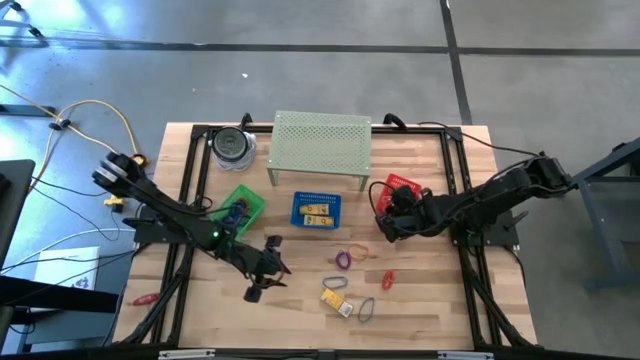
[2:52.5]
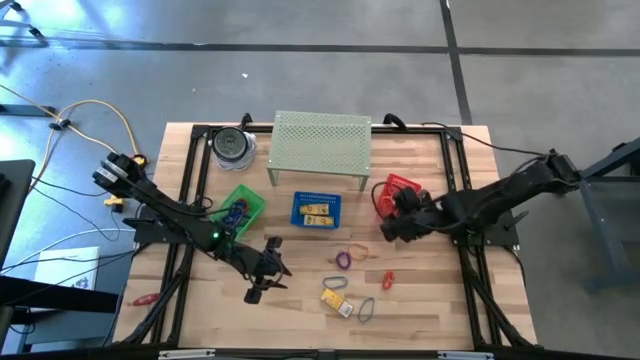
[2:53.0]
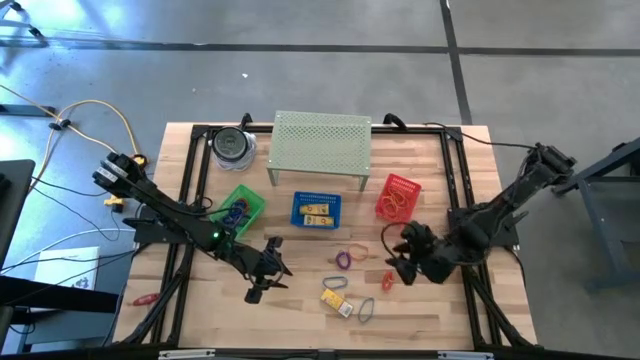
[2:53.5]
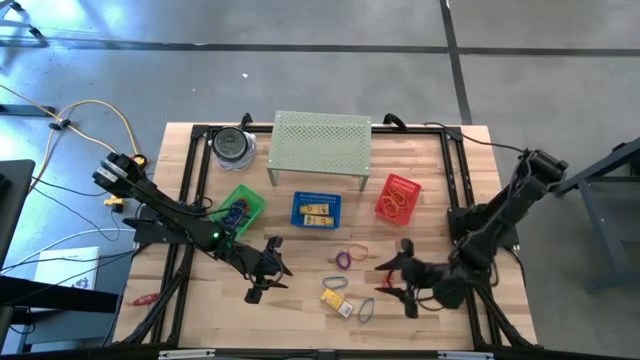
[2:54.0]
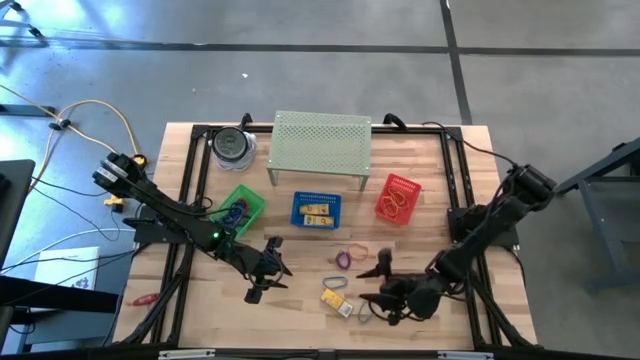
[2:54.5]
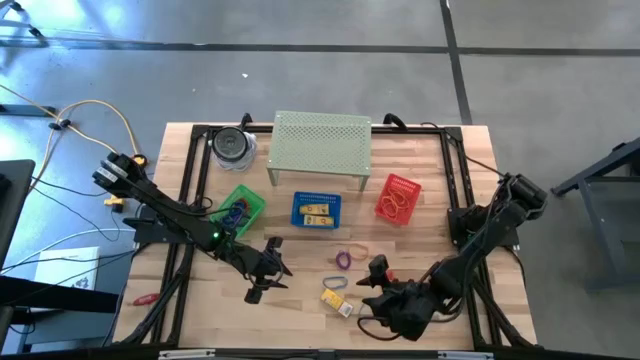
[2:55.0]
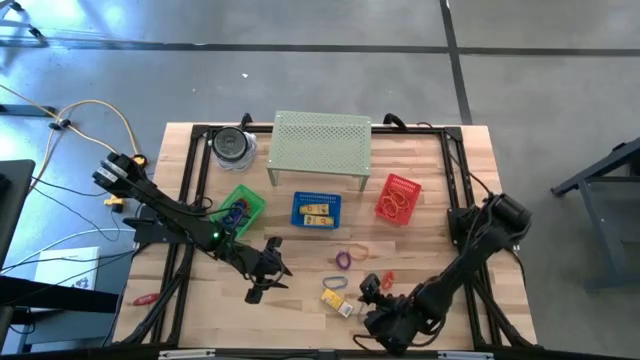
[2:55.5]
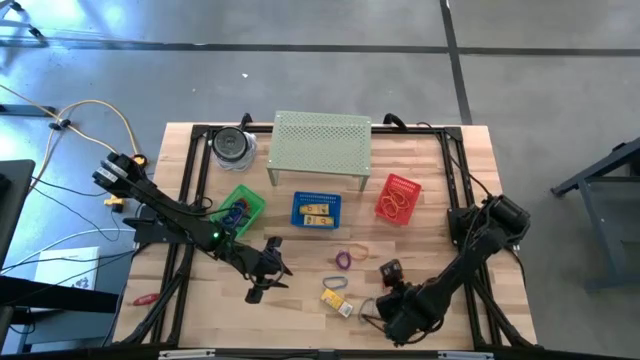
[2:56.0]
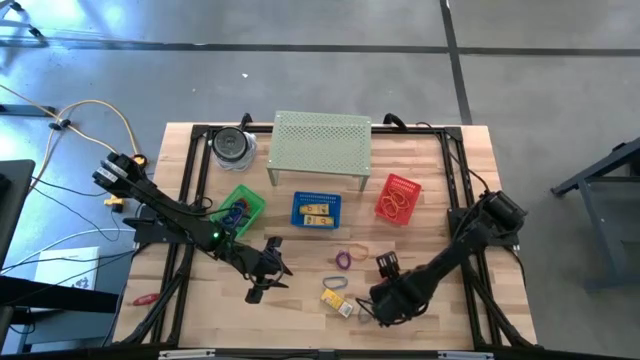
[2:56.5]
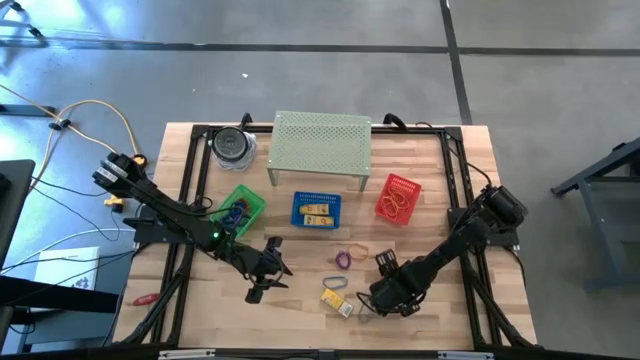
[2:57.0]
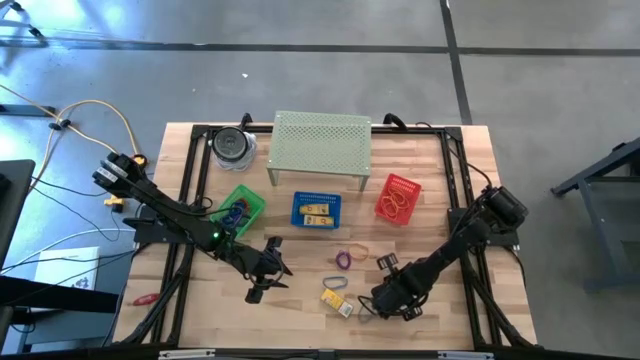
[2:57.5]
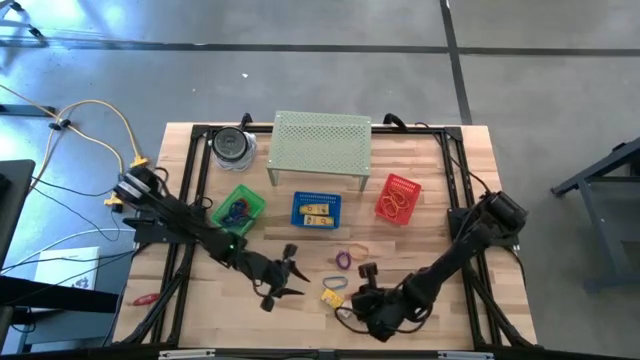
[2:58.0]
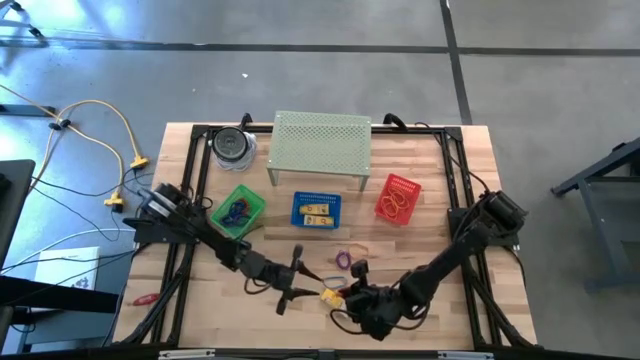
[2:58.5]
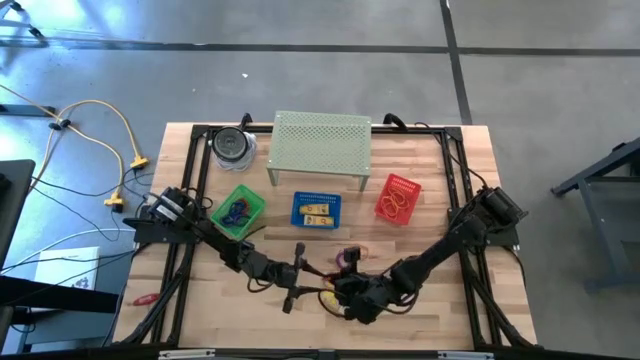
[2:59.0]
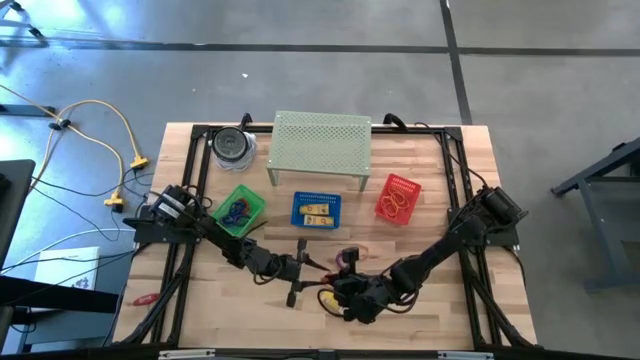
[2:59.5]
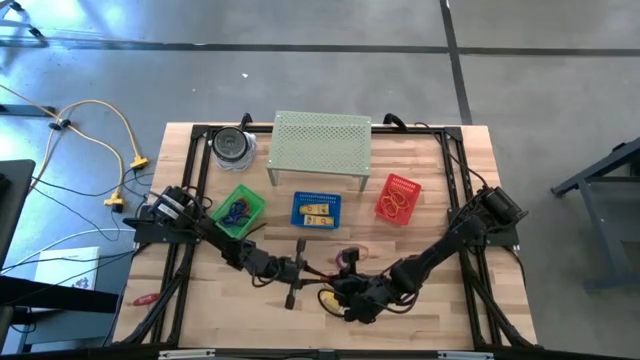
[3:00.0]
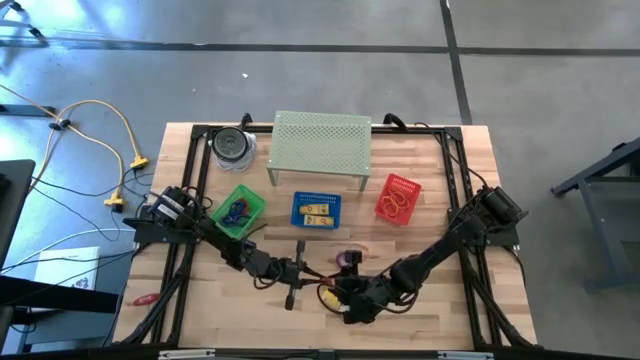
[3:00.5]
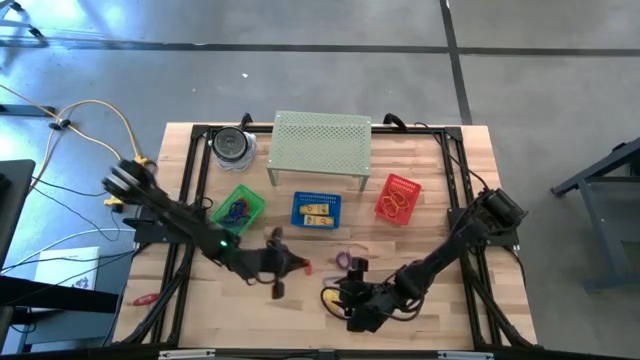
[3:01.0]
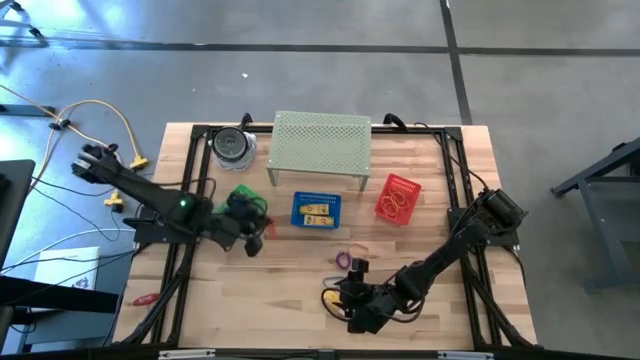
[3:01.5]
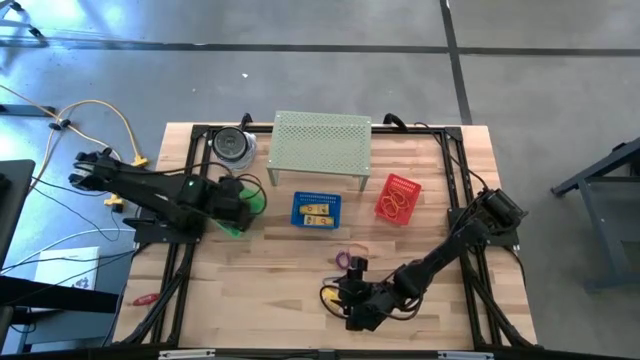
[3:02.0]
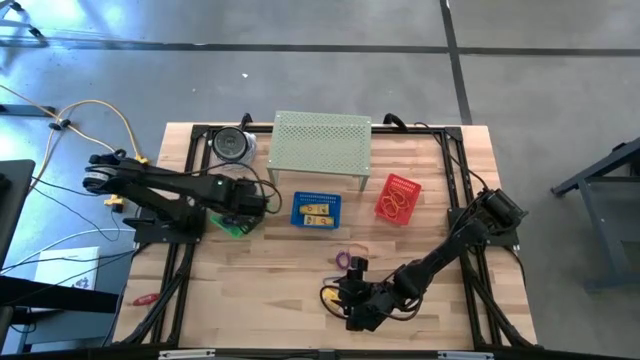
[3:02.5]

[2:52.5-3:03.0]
Task: Pick & Place Office Desk Supplies
Put the orange spring keychain into the green bin

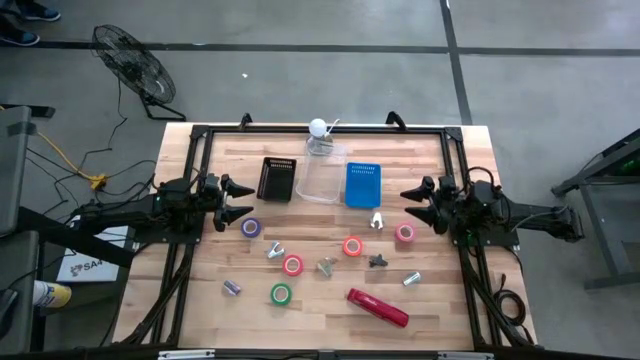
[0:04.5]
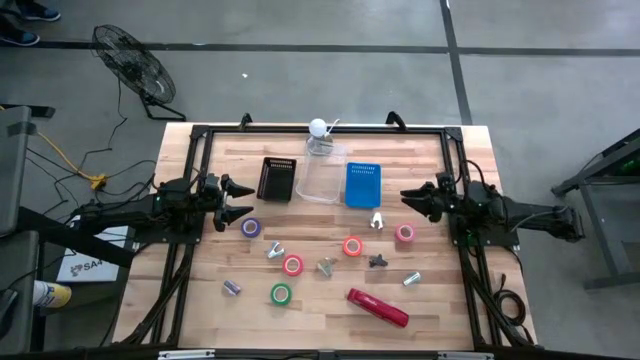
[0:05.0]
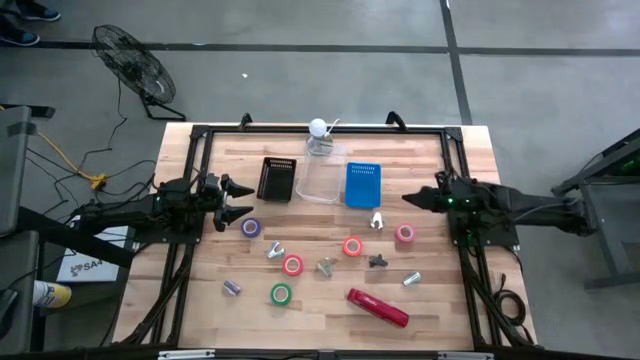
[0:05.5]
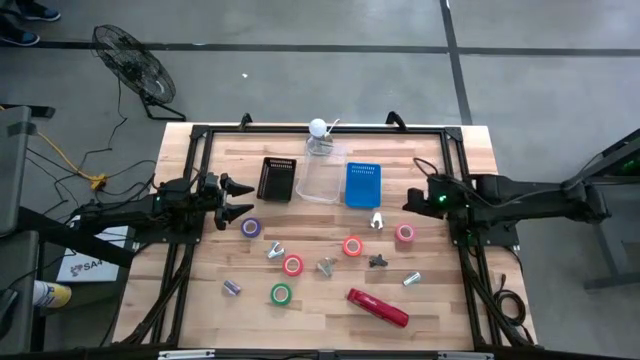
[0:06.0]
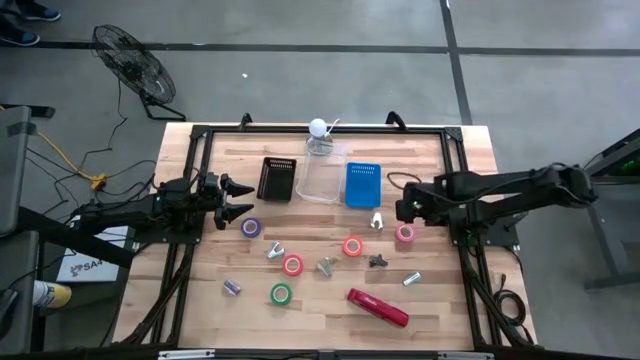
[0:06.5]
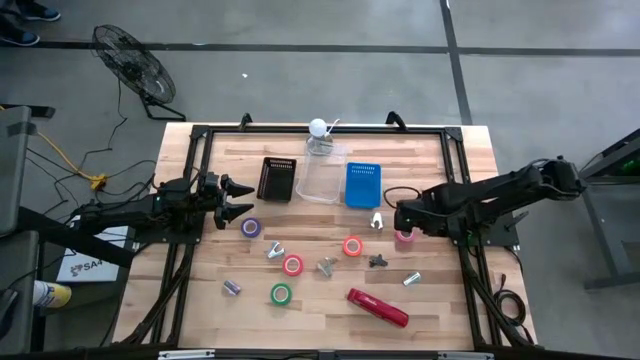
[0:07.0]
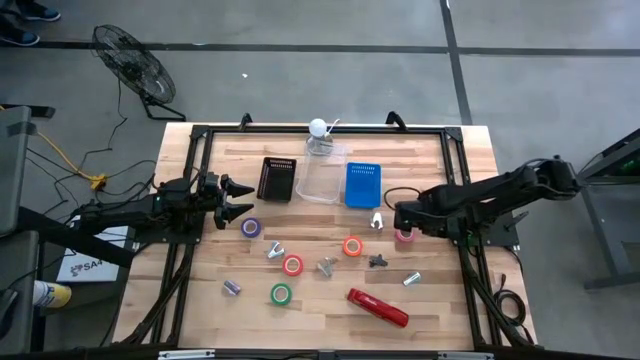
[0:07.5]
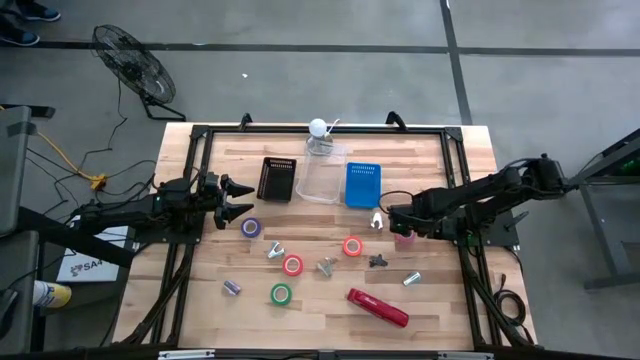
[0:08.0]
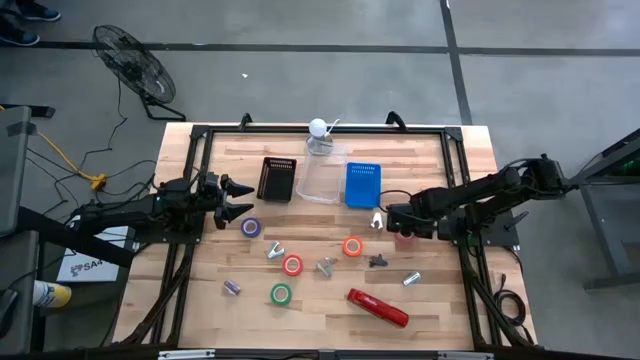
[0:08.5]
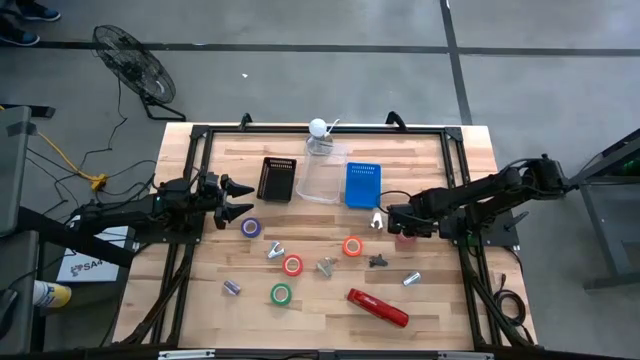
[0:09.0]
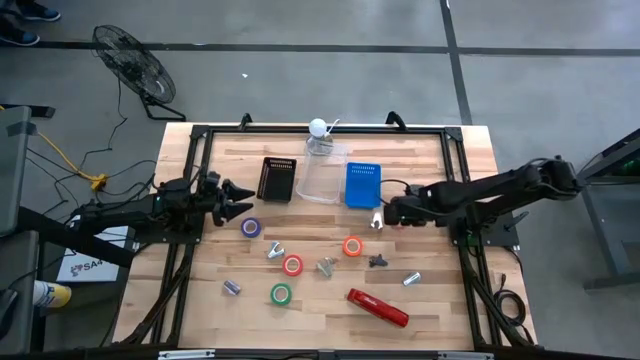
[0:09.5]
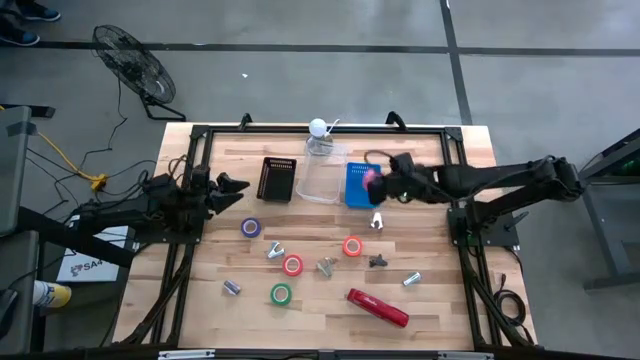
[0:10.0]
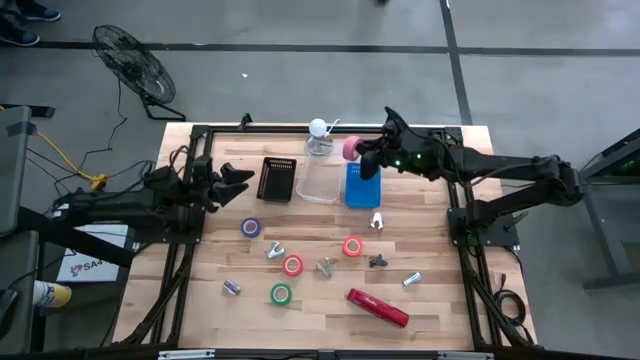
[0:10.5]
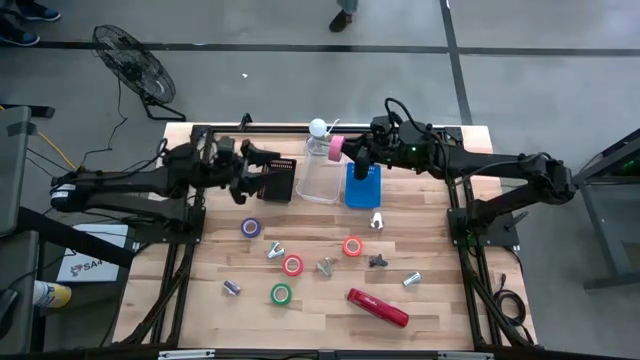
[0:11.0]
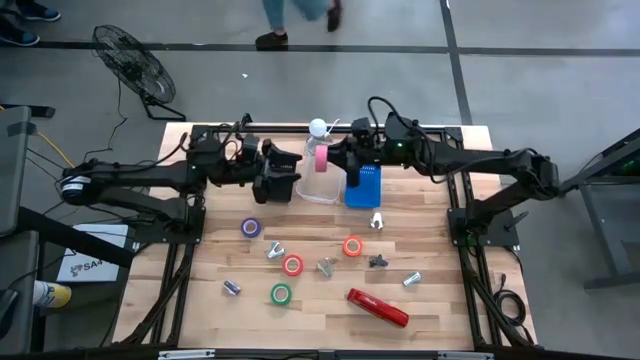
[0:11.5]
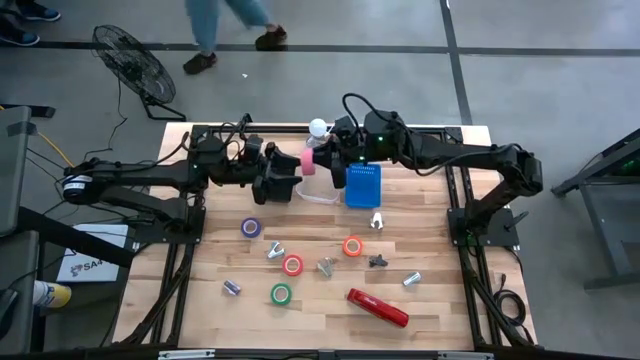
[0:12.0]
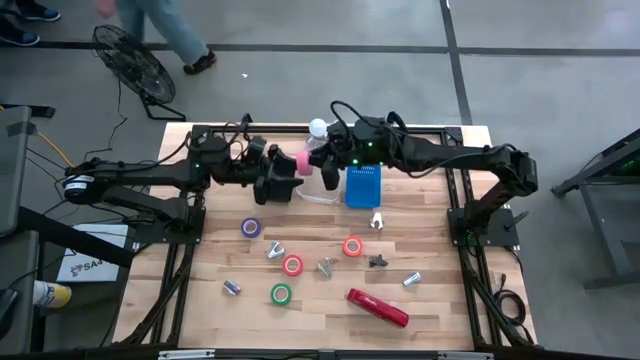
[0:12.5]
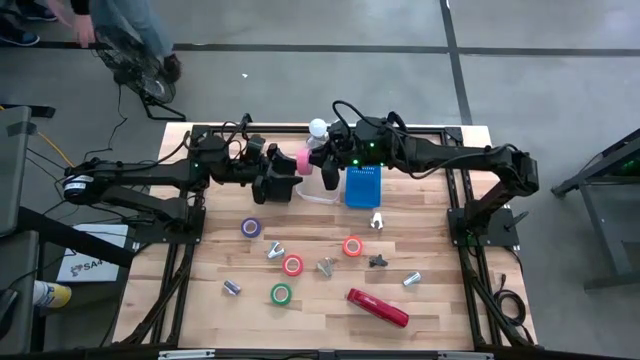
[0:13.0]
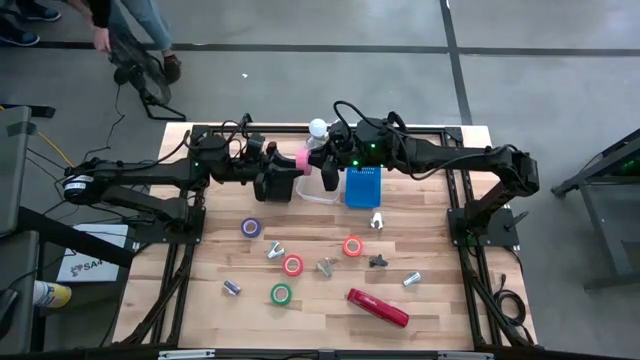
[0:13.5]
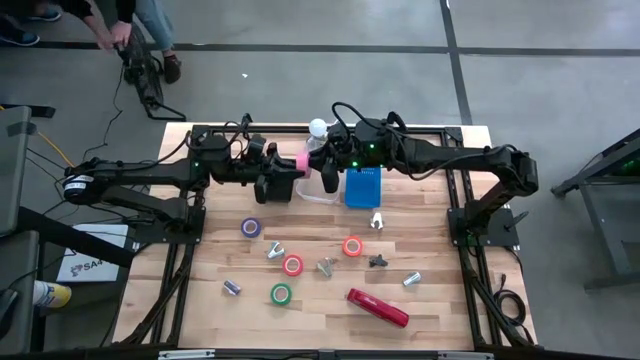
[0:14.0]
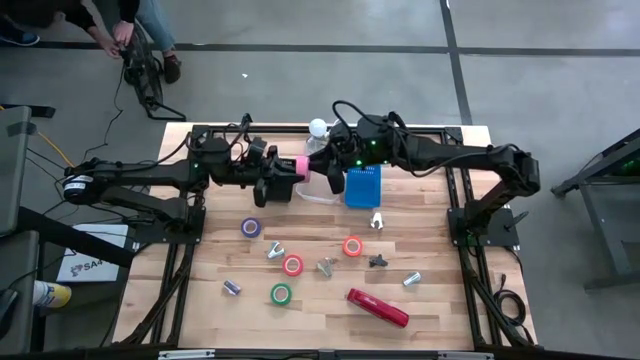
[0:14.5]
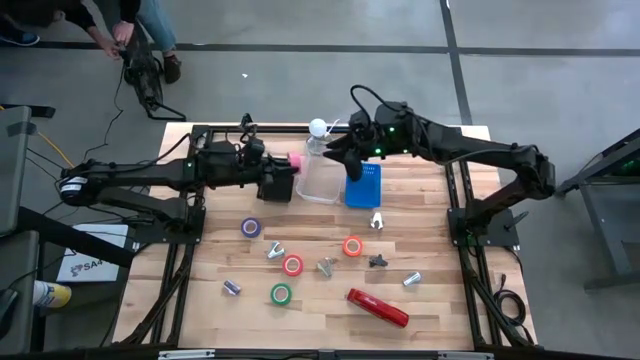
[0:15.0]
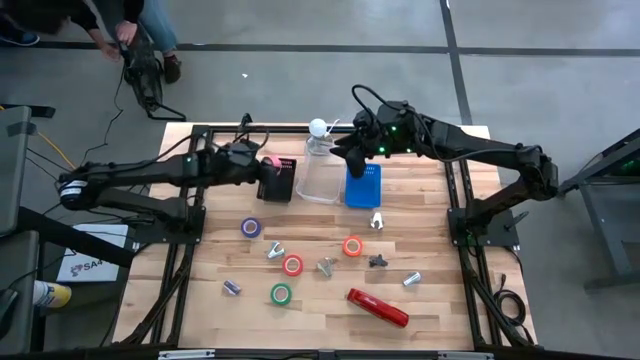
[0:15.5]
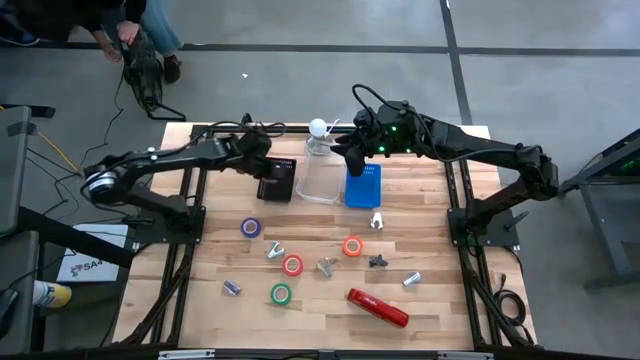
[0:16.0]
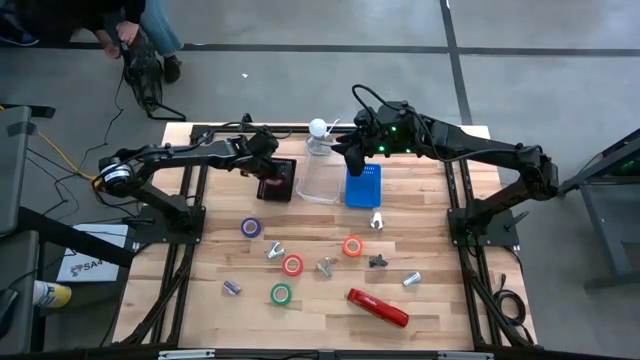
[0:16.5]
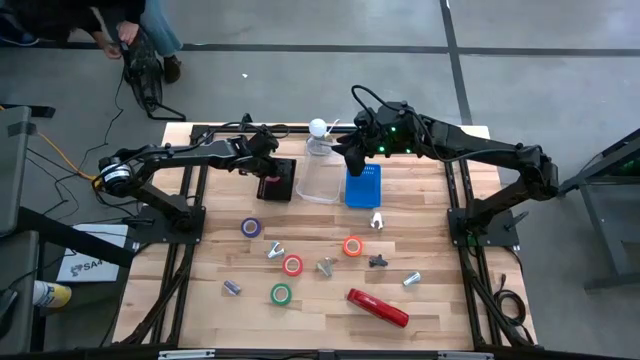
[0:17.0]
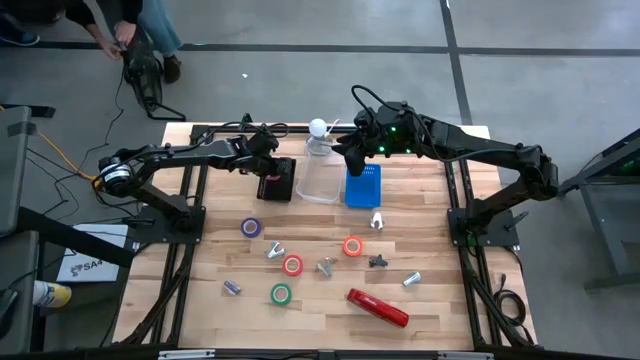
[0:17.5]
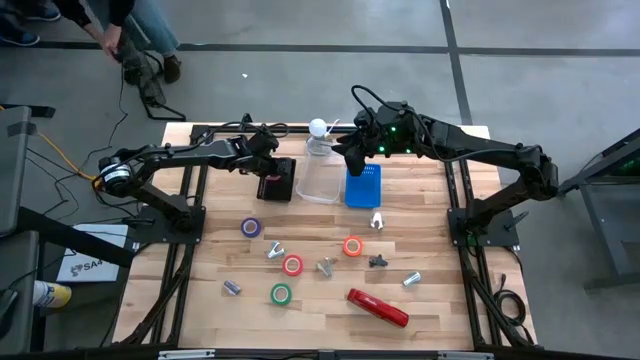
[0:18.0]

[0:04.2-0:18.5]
Task: Pick and place Stapler, Stapler remover, tape
Put the pink tape into the black basket
